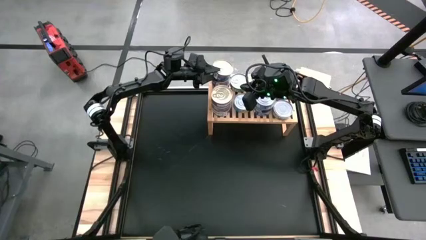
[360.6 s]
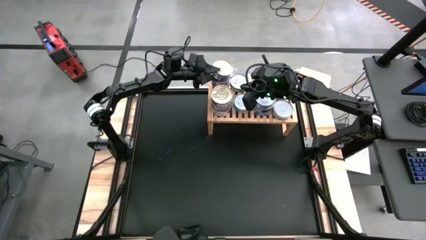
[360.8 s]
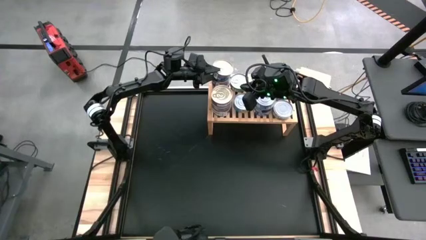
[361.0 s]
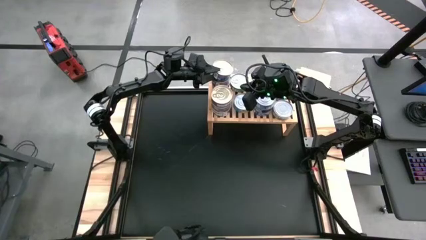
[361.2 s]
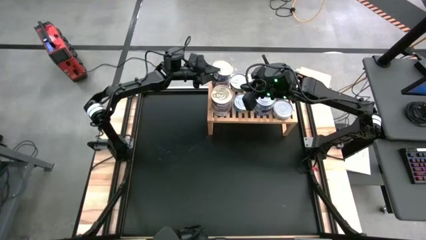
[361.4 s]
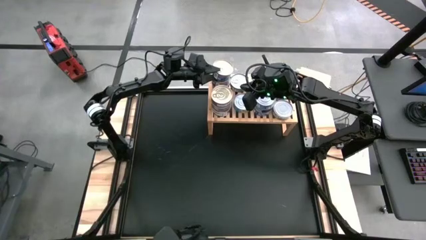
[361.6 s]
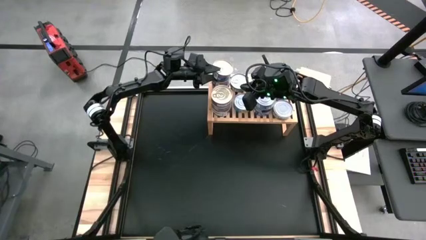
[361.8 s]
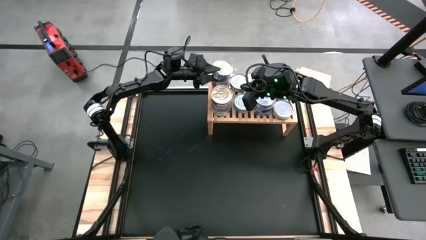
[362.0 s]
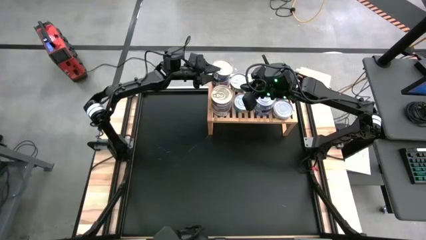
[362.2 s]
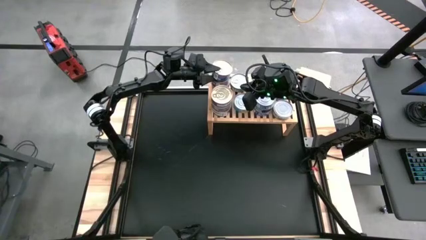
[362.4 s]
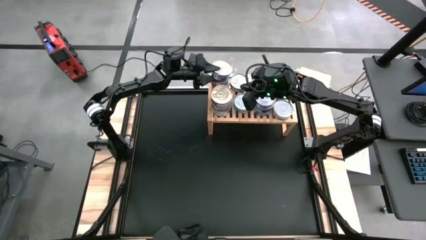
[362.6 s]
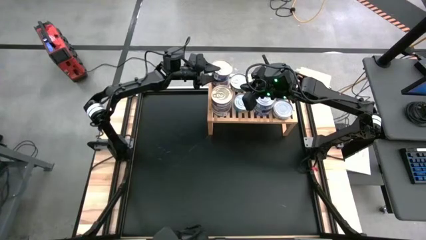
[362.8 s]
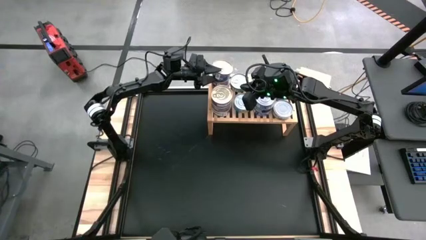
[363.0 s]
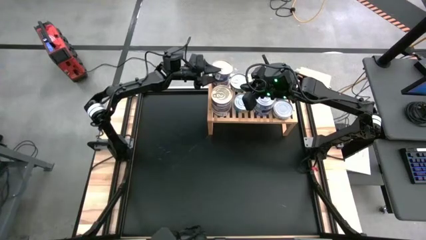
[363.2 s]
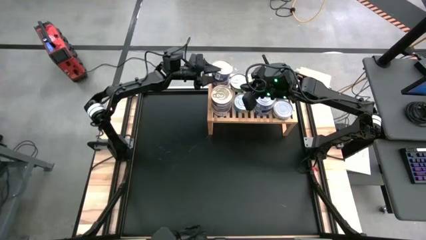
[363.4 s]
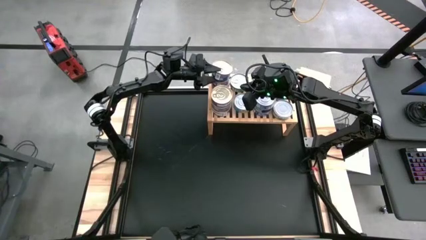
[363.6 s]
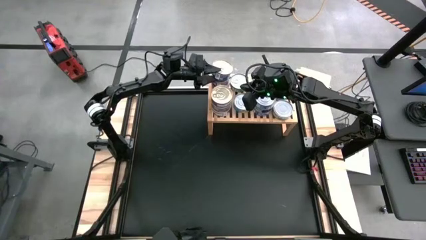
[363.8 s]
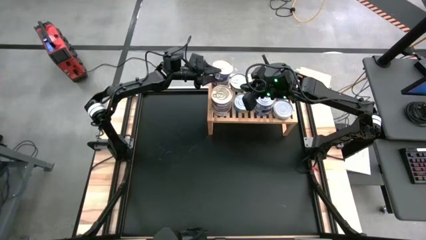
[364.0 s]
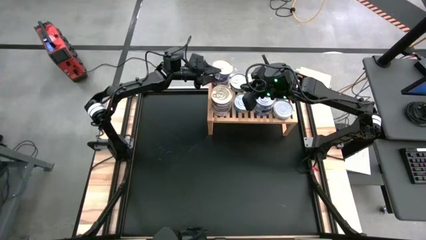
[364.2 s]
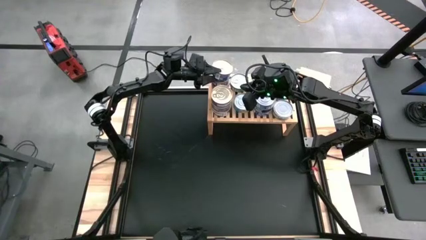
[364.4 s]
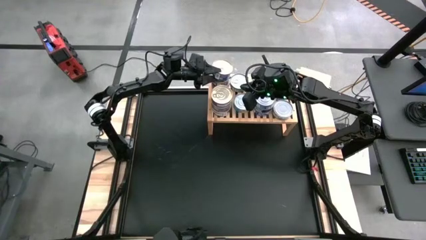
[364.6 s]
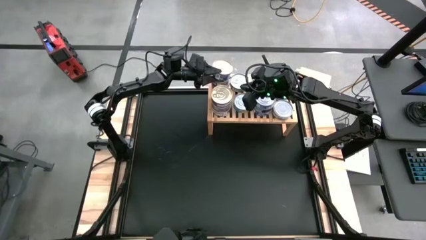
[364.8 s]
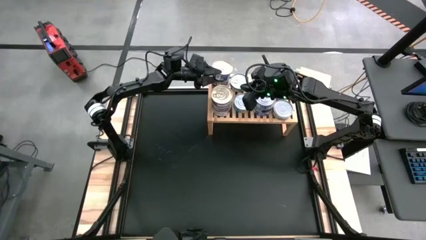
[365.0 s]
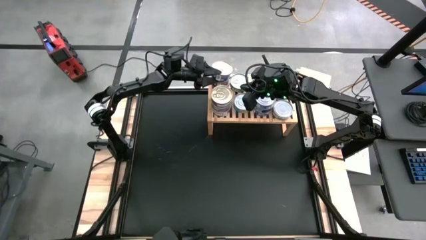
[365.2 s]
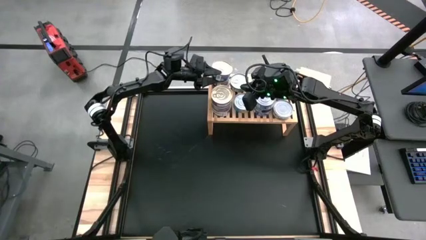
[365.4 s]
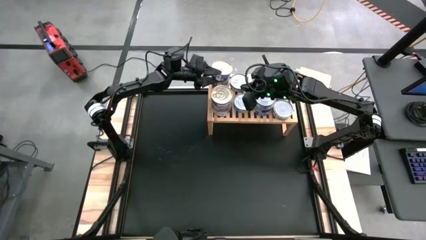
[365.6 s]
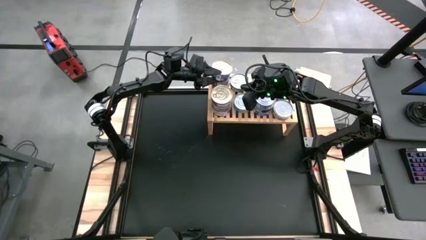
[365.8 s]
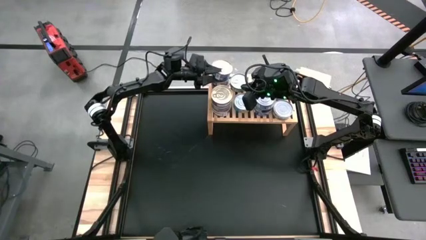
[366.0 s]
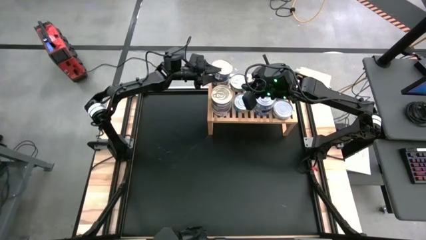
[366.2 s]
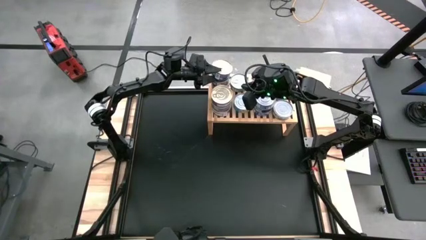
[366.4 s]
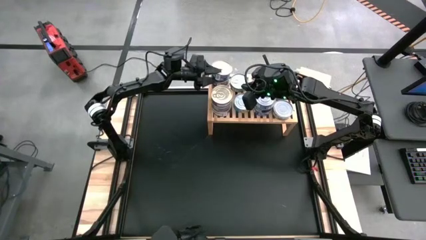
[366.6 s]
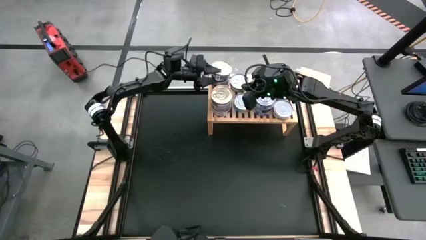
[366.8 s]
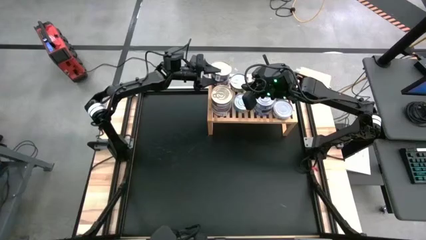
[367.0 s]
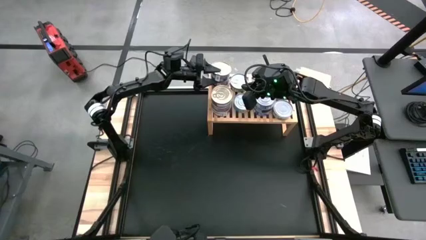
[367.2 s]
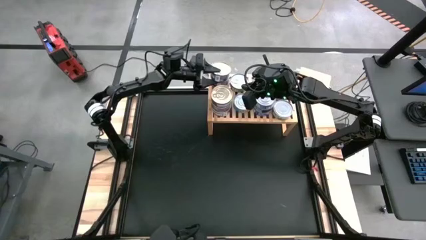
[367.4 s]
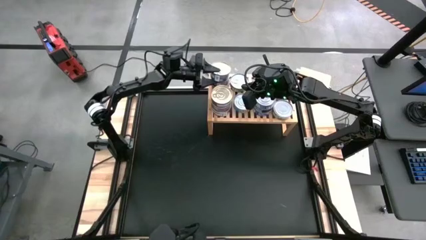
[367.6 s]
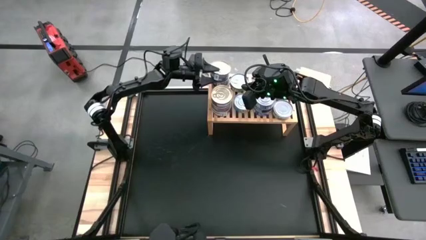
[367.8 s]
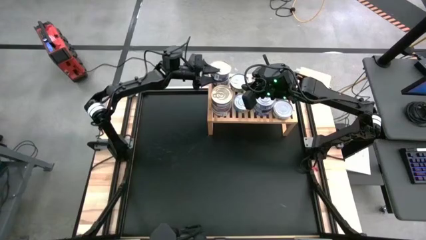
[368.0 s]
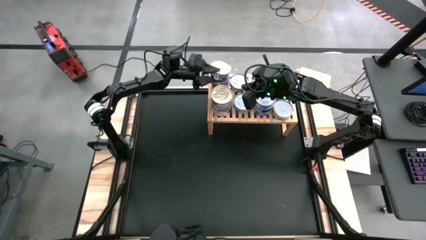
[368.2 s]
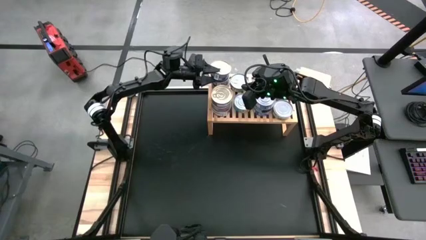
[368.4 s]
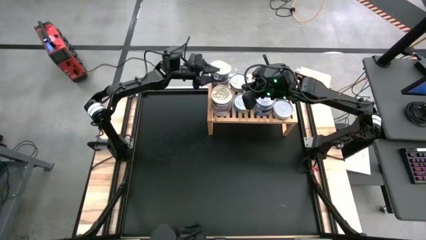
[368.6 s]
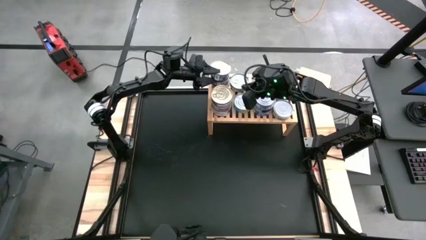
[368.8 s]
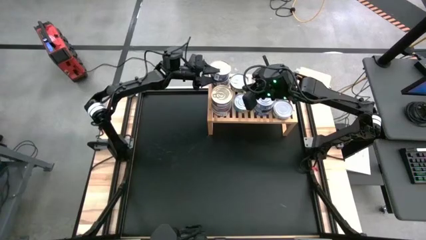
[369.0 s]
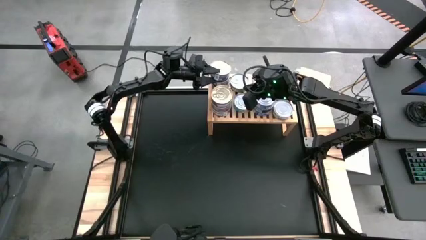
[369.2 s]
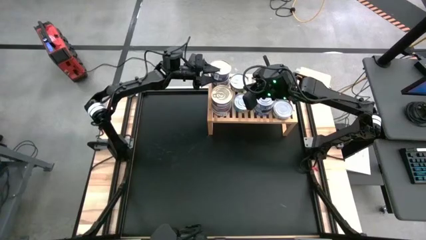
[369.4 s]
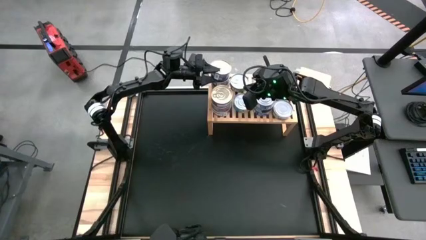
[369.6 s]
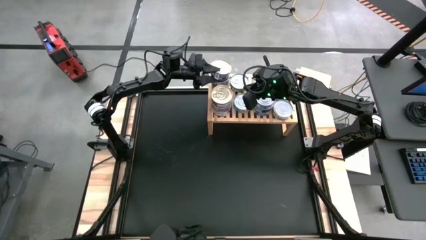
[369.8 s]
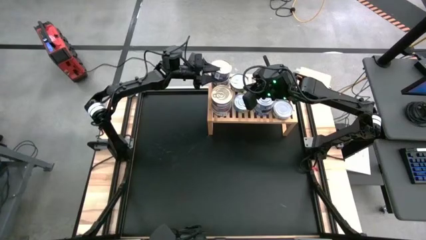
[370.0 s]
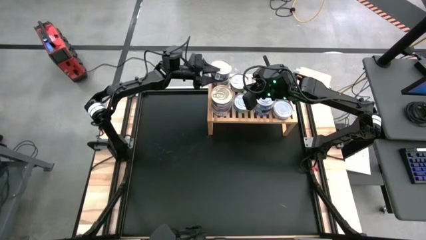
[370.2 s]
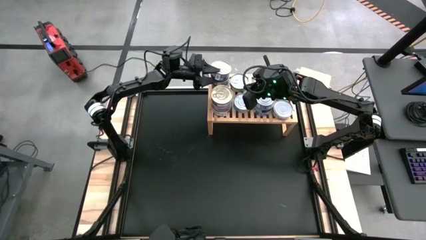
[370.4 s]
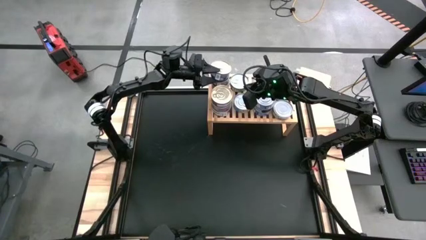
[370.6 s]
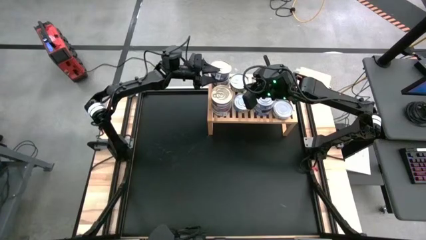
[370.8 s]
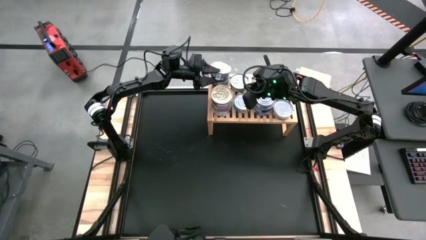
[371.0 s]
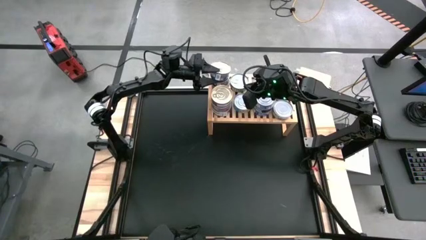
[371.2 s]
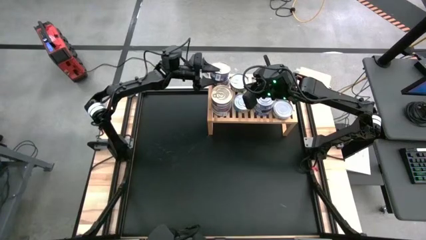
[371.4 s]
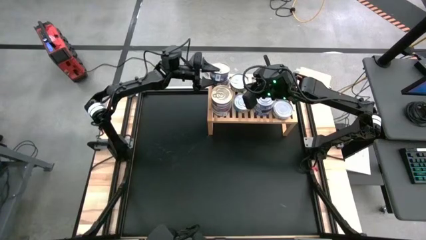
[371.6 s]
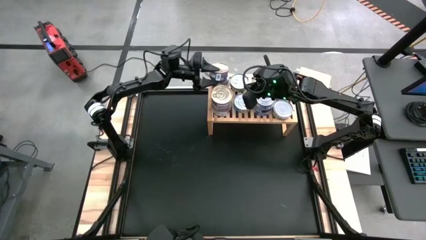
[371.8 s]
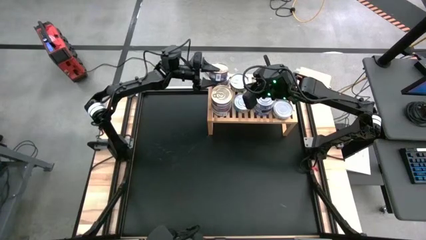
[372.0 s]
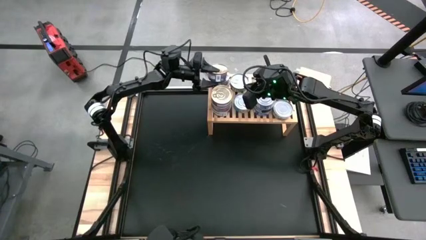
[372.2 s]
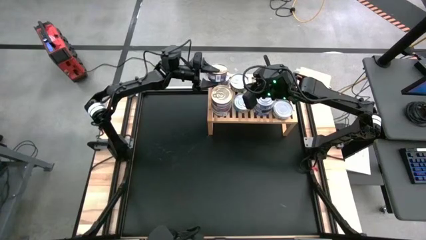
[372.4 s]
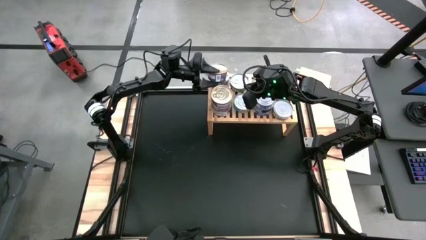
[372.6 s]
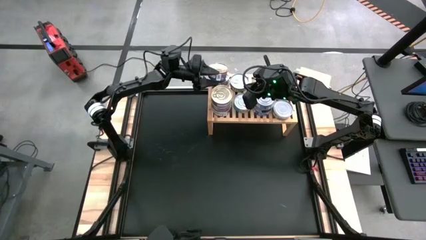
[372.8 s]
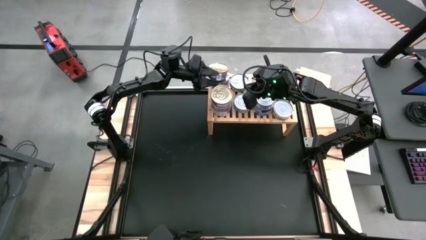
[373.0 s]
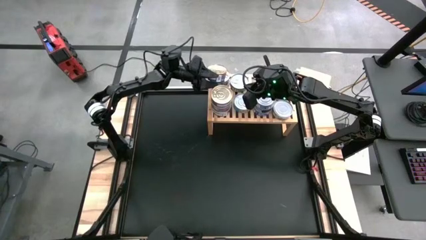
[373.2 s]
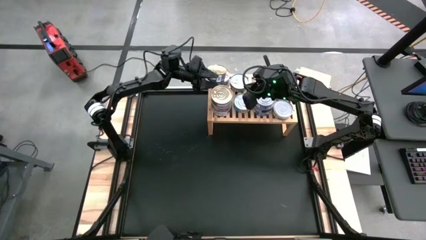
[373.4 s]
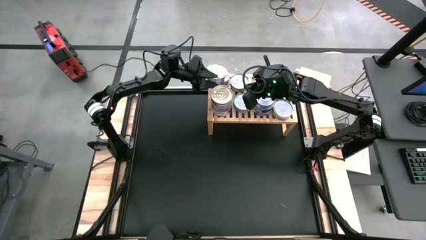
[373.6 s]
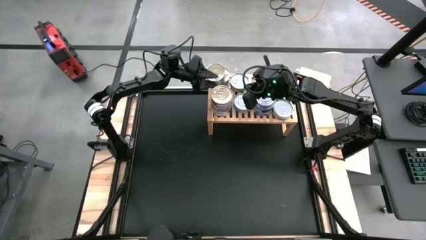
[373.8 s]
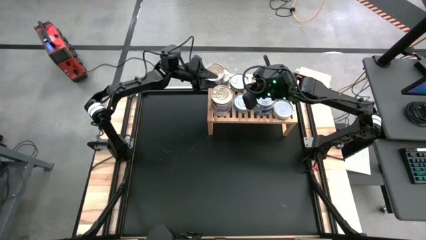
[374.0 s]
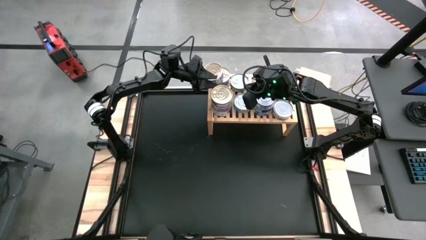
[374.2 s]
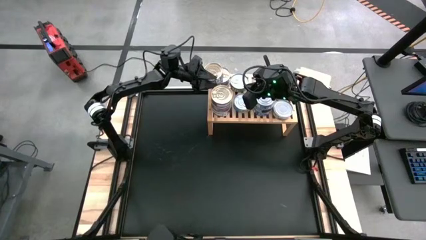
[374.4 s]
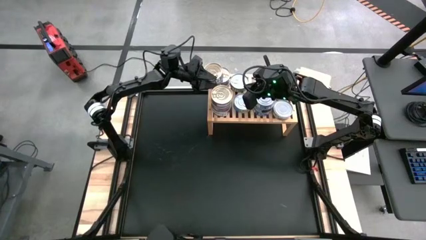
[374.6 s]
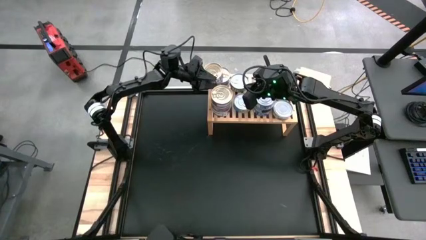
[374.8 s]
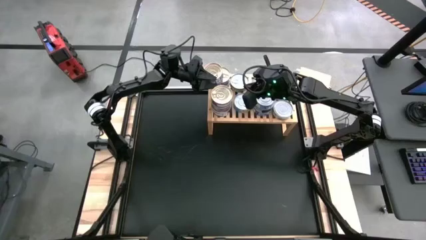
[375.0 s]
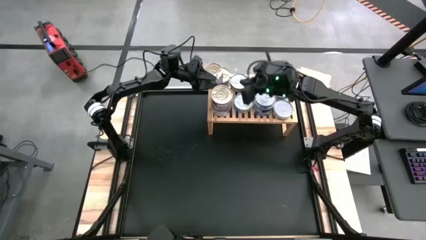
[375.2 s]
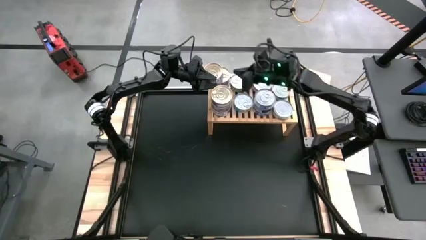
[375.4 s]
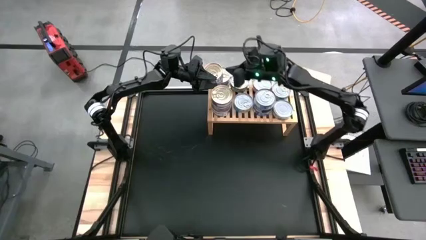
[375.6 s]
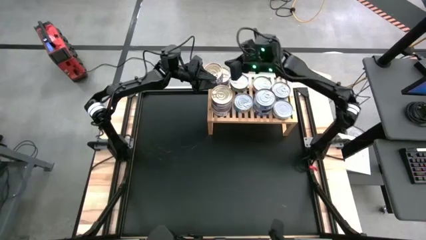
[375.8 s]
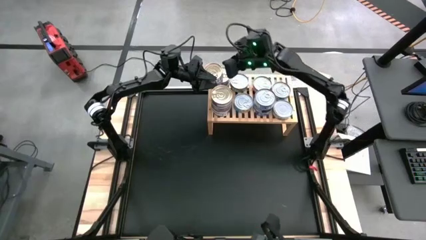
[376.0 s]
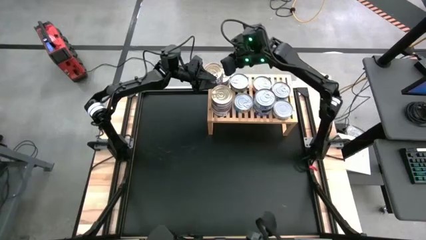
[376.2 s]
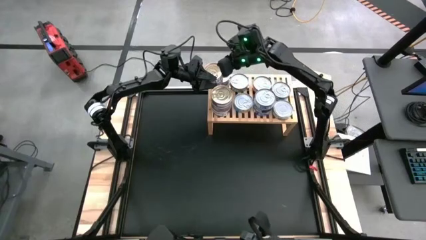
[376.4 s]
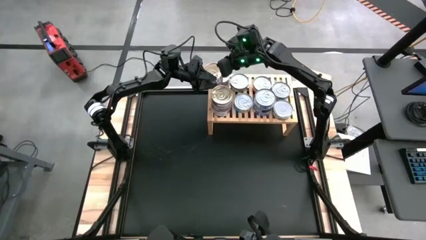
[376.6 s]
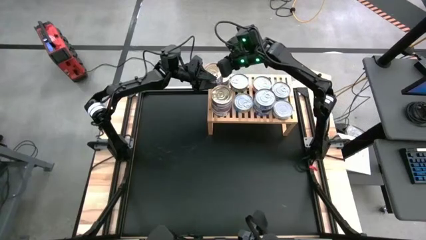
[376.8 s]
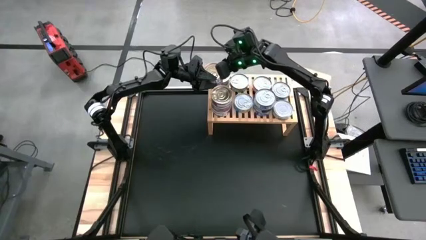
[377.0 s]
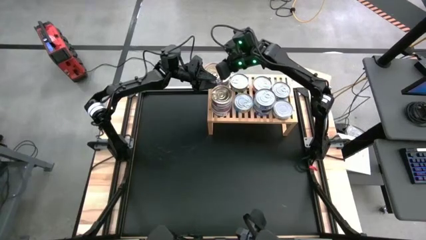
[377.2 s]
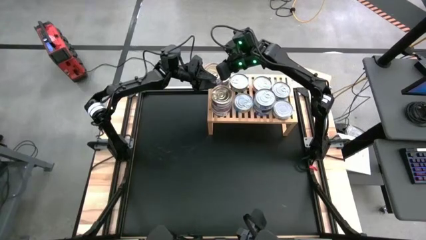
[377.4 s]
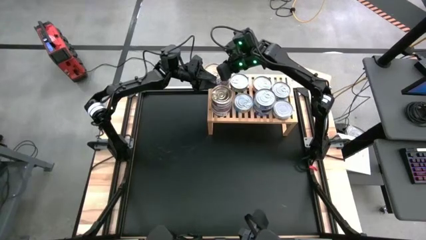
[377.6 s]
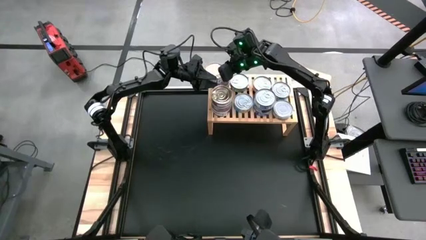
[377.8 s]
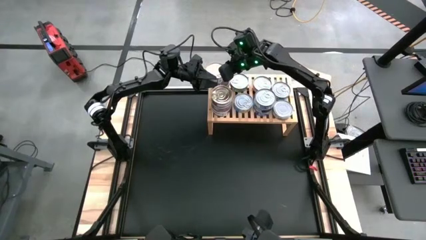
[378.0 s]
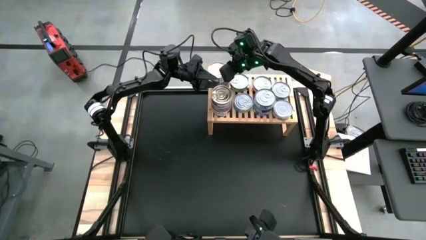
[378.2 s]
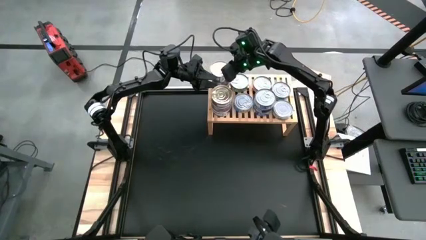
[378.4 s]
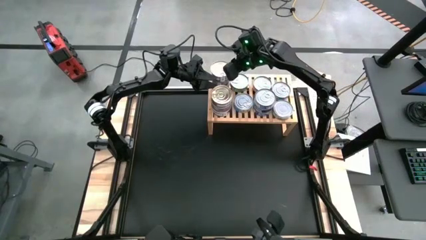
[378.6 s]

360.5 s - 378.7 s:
Task: Stack canned seafood by type on shelf
Stack the blue-pink tuna can on top of the blue-pink tuna can on the shelf
